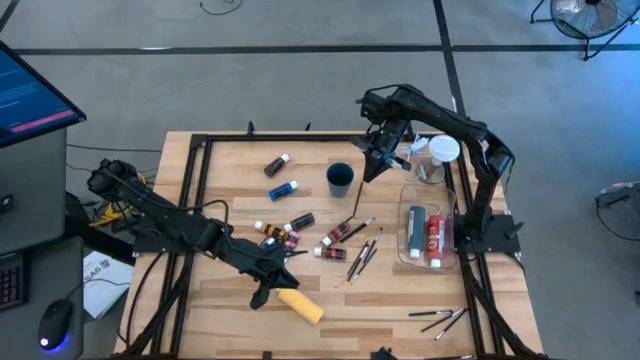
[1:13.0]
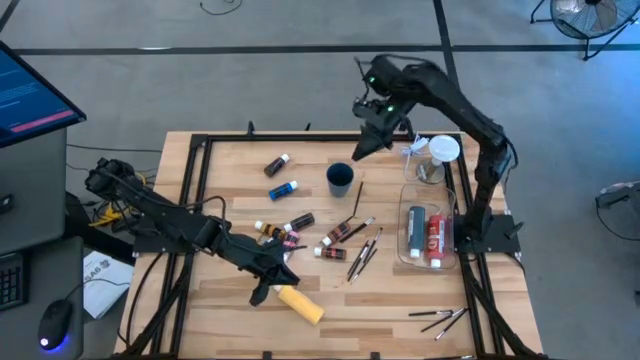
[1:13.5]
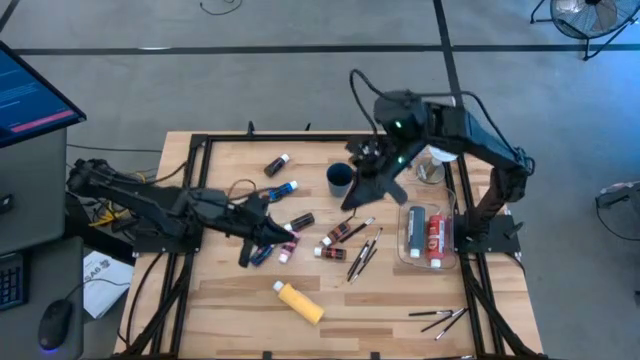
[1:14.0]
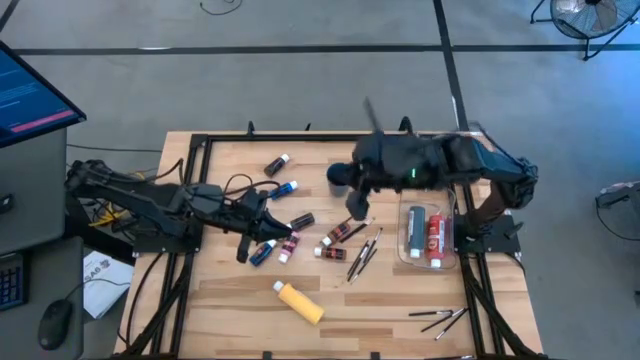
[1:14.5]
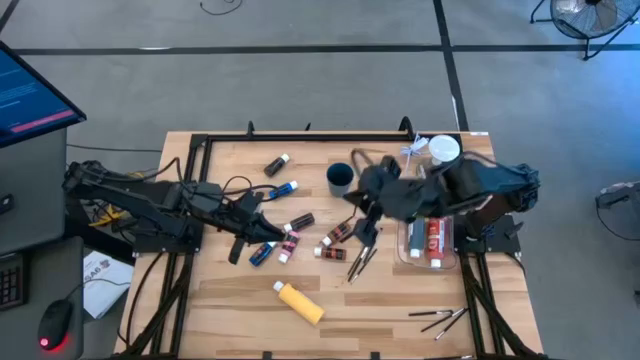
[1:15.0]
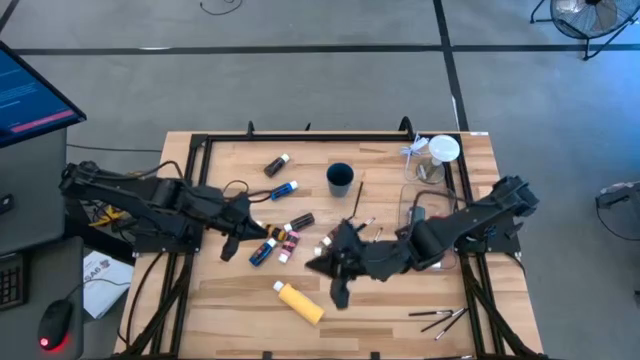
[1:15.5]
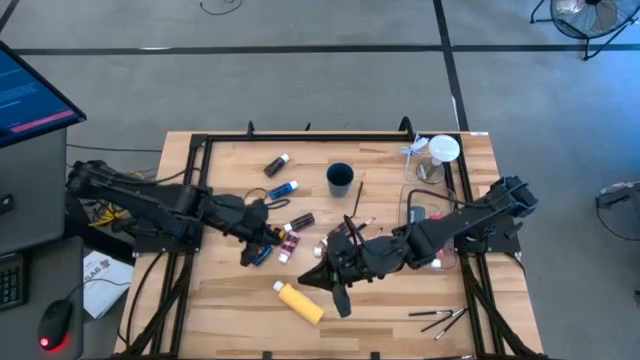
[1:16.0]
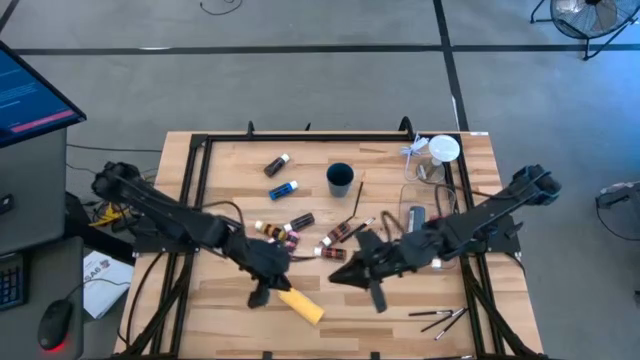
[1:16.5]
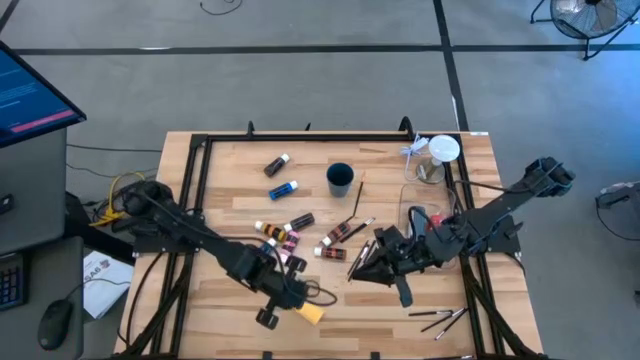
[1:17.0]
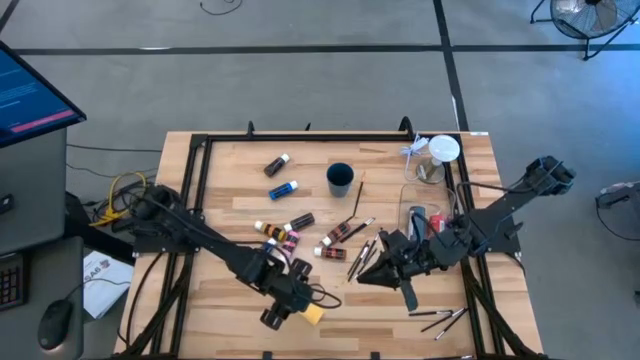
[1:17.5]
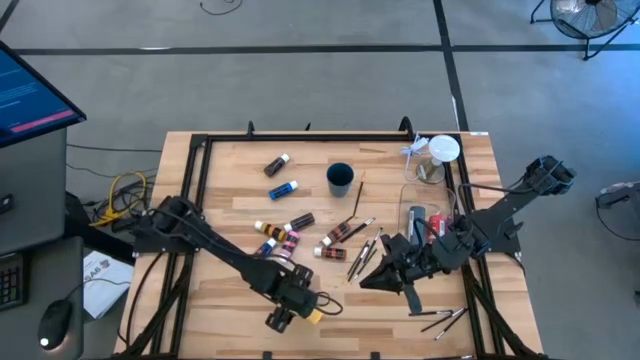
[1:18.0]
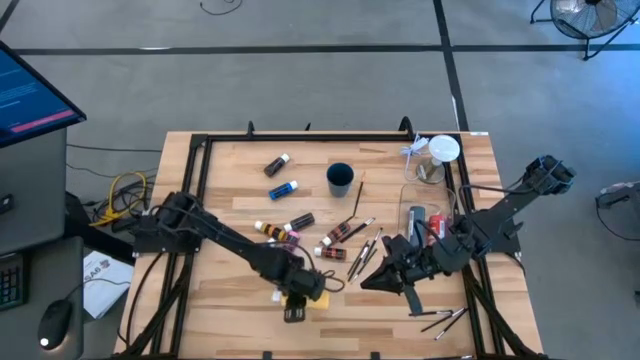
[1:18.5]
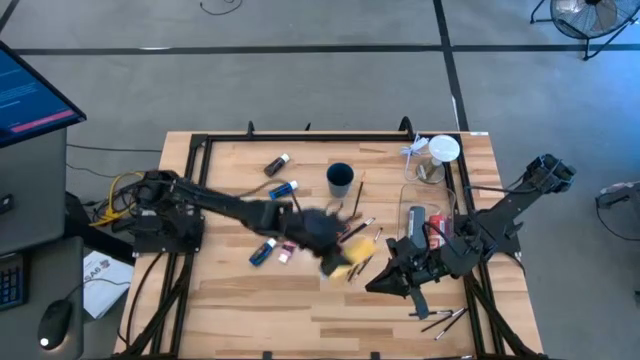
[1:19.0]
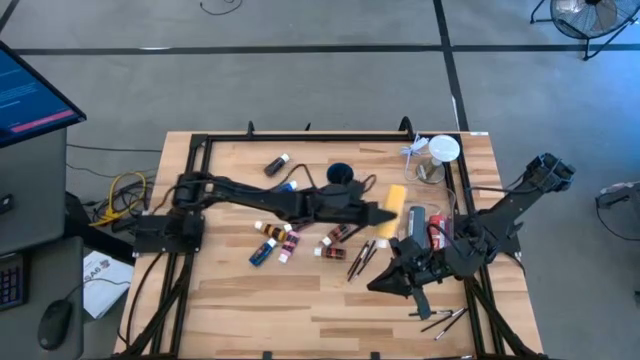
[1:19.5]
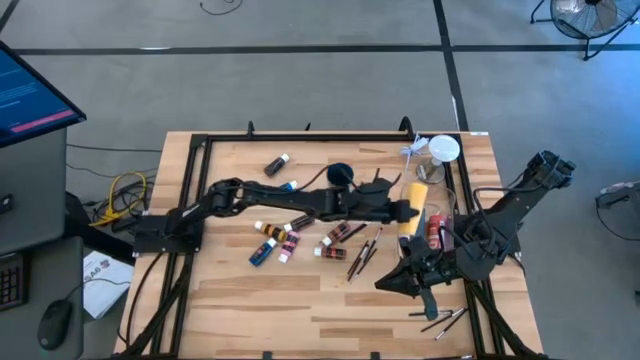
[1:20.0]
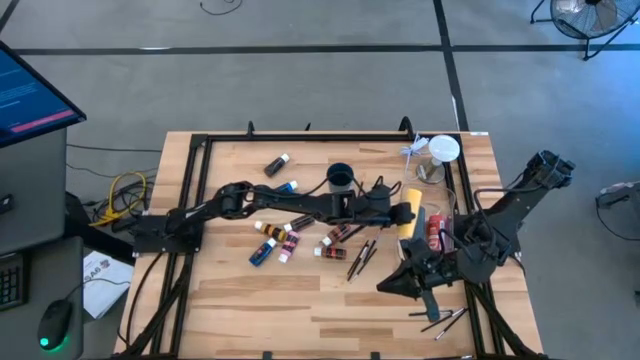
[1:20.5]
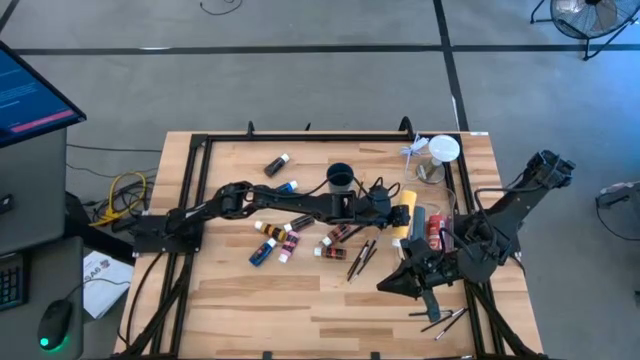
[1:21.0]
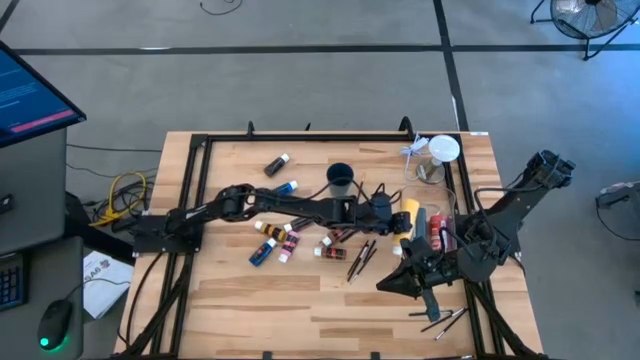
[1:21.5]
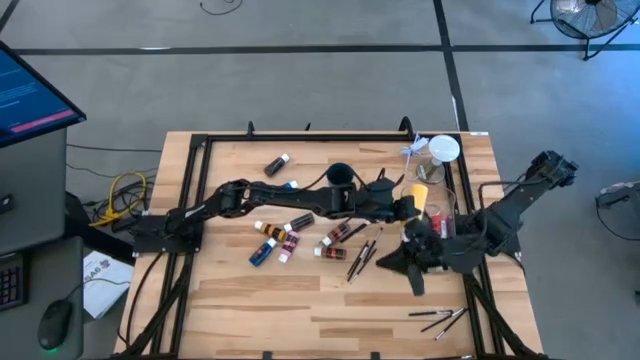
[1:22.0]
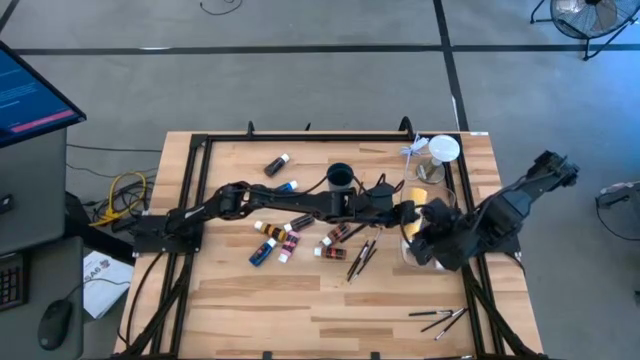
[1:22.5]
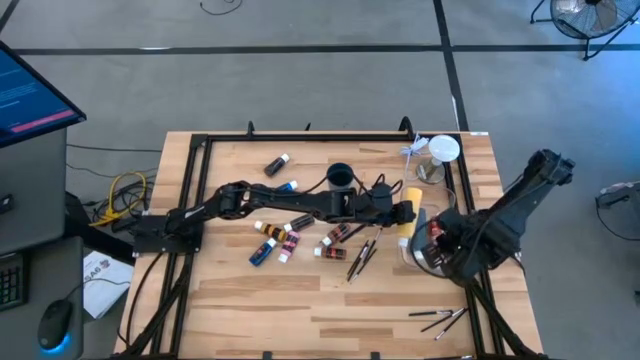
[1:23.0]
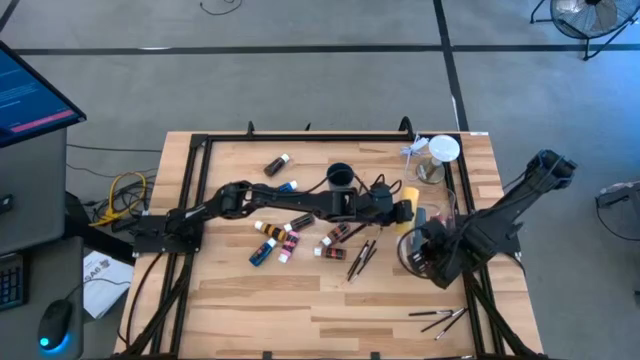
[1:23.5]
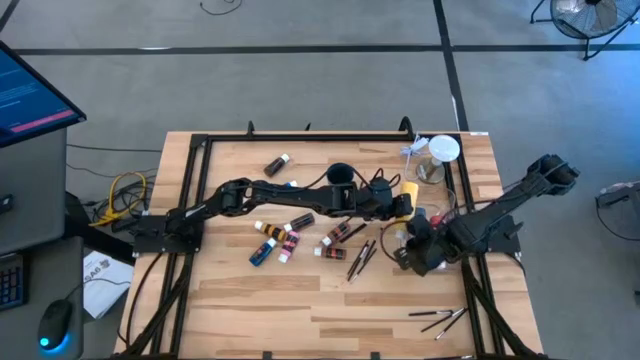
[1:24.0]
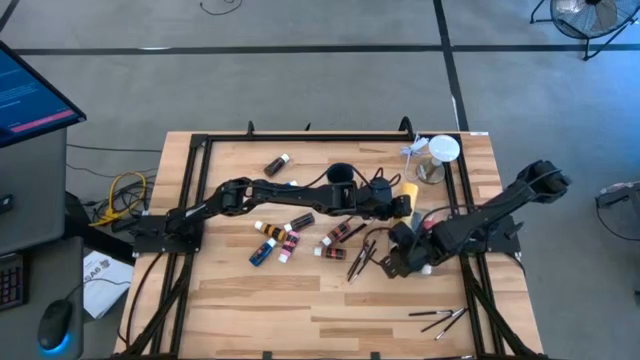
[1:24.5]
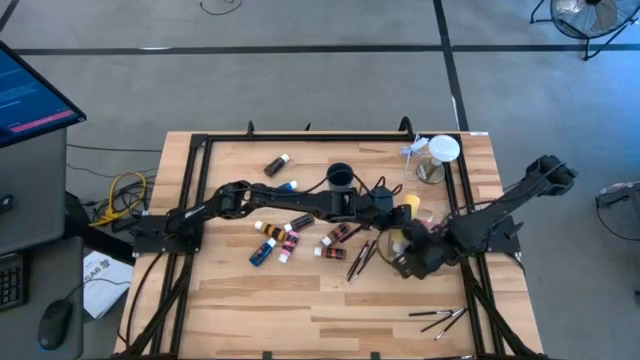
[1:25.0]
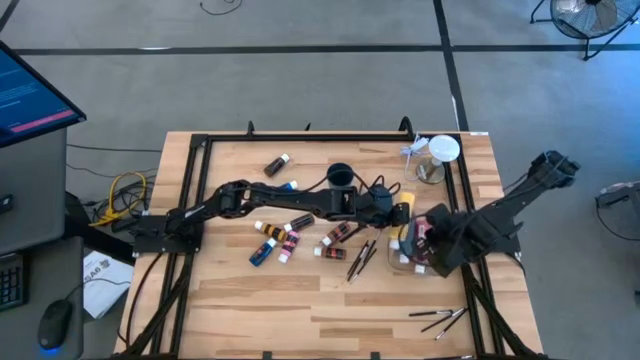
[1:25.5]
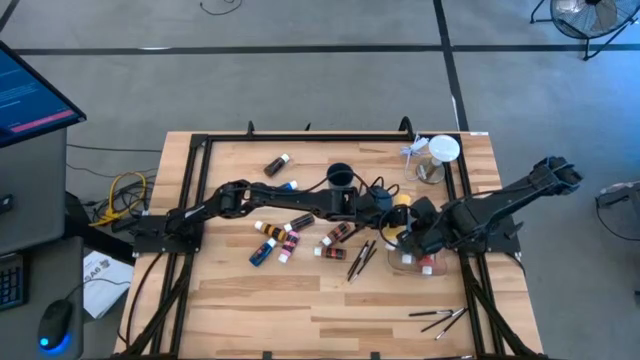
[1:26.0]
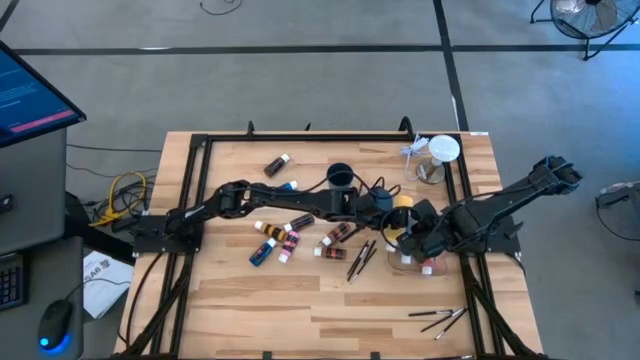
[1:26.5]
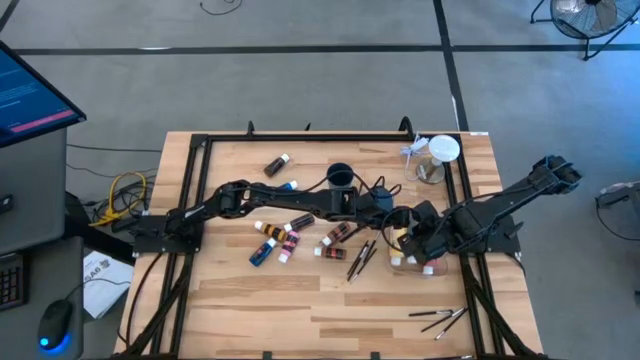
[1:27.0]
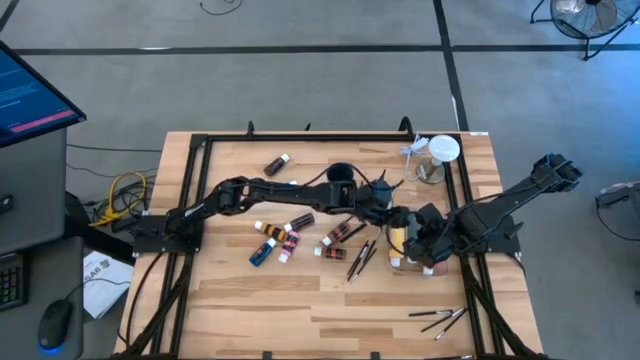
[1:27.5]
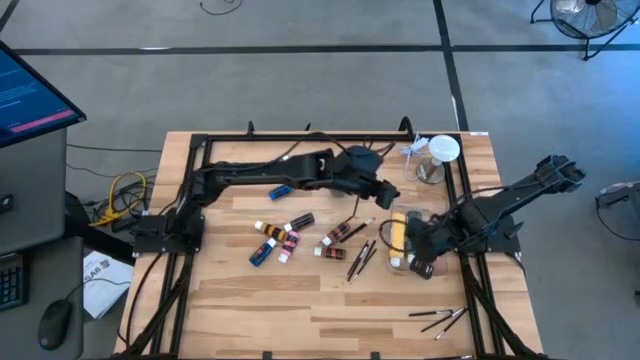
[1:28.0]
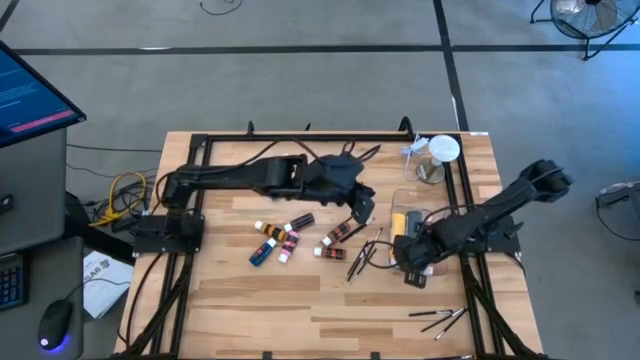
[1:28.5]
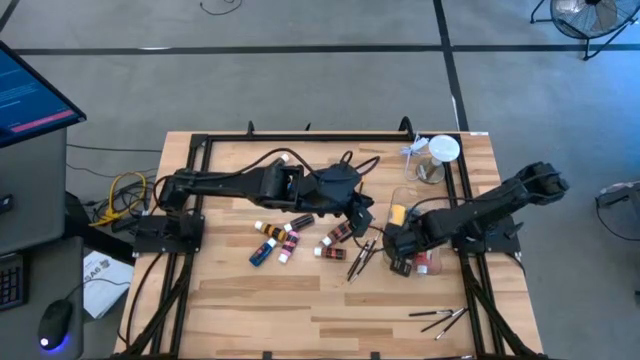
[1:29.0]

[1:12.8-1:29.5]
Task: Pick & Place Paint Supplies
Put the large yellow paint bottle into the transparent bin

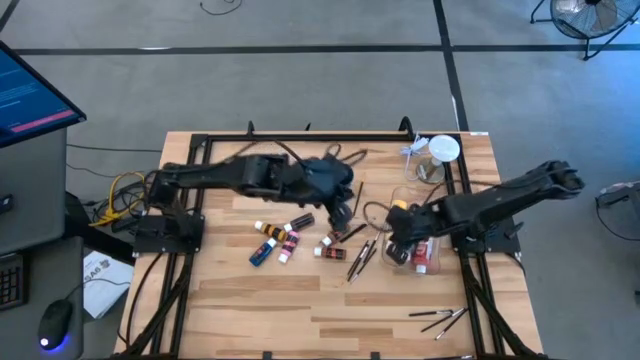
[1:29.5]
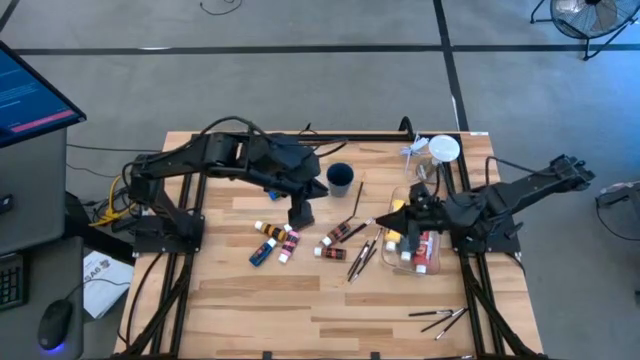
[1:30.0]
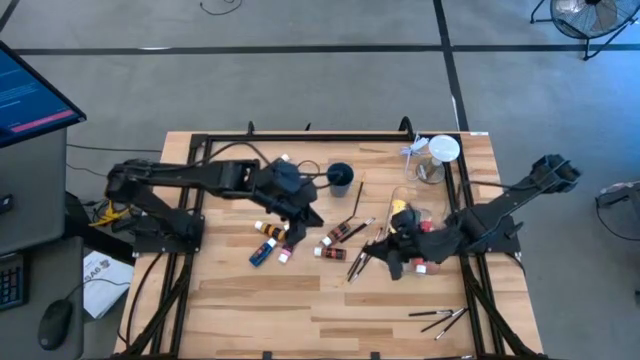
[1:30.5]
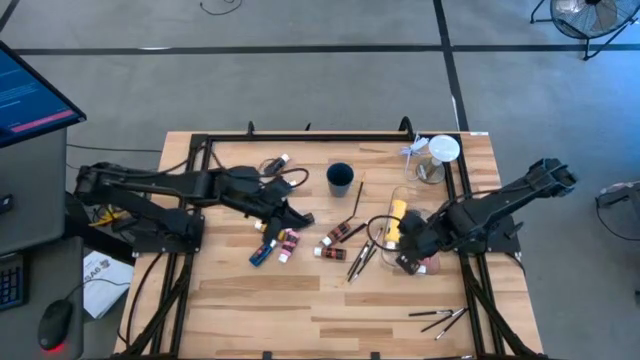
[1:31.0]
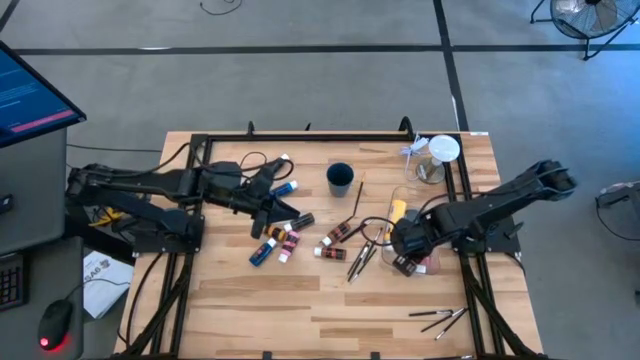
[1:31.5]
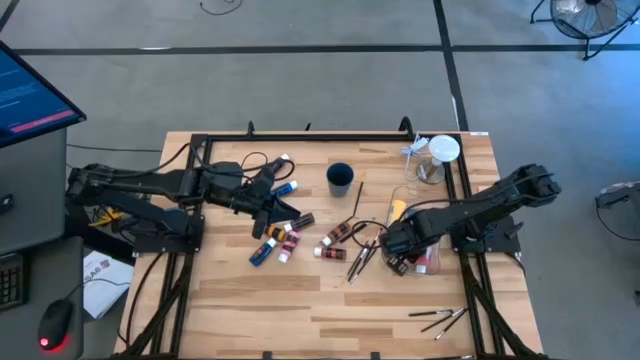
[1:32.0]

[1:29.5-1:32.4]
Adjust the black paint bottle in the transparent bin

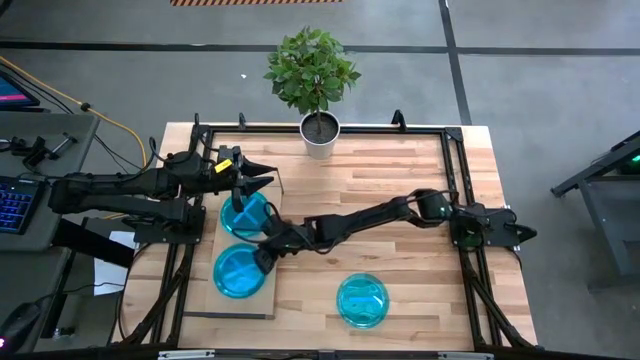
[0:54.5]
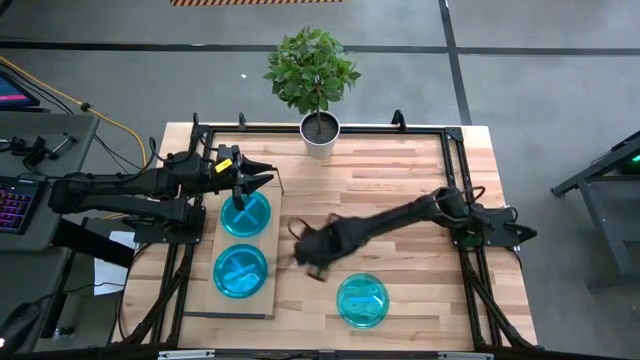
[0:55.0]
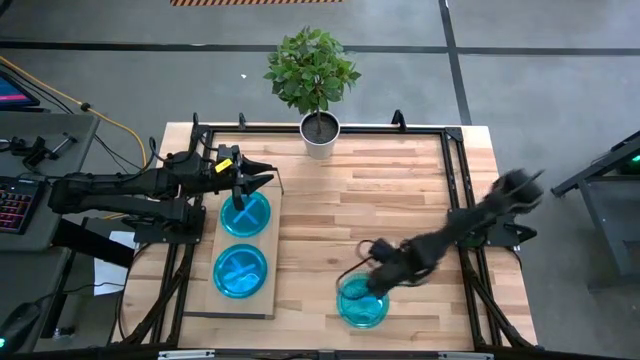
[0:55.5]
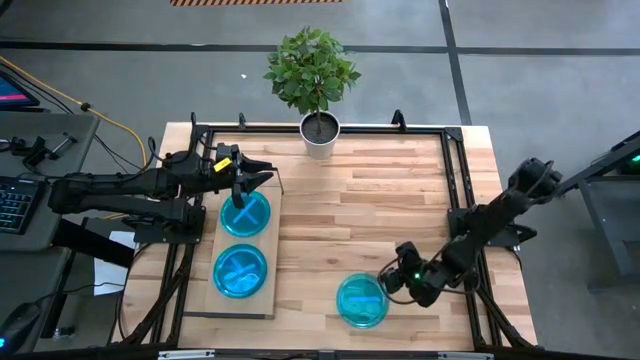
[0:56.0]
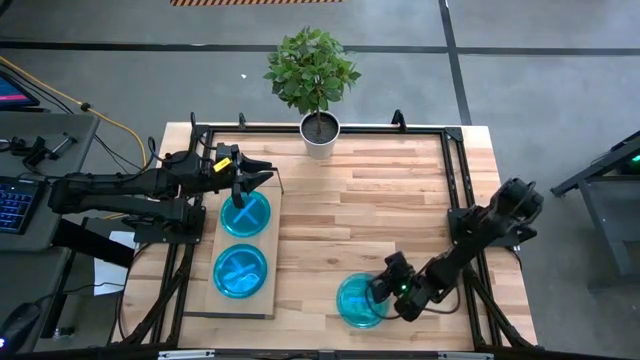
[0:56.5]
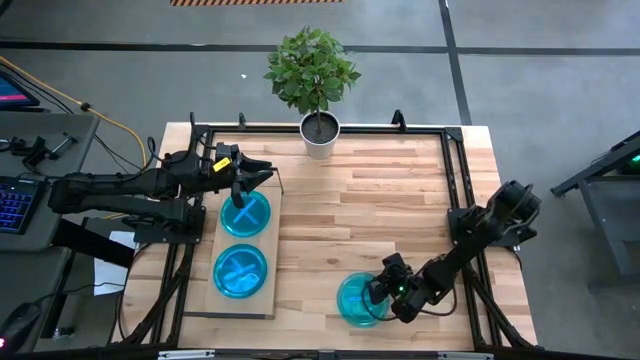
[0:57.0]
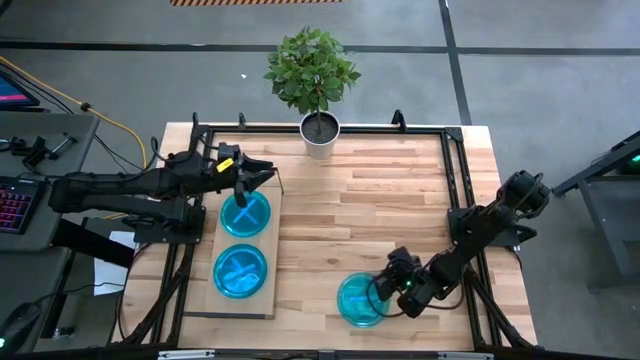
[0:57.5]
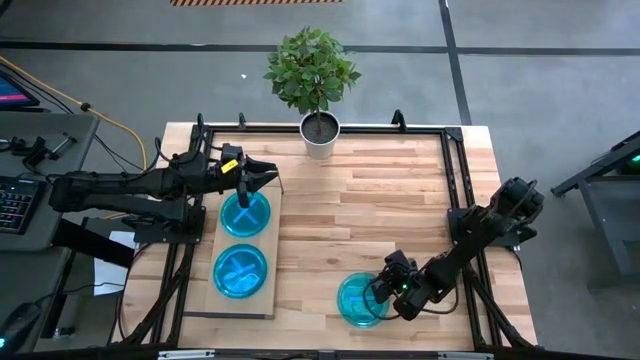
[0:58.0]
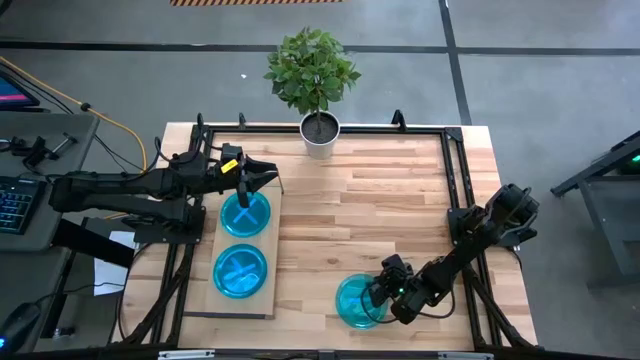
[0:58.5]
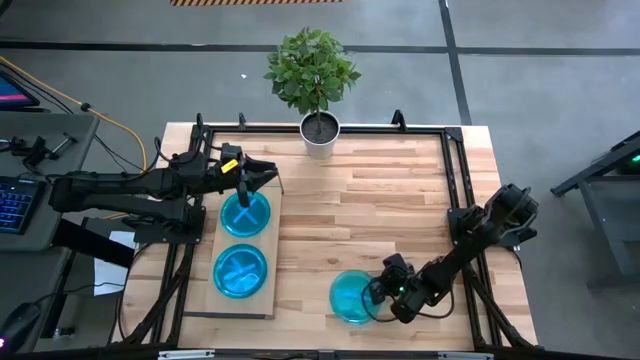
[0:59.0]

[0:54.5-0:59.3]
Task: Place and stack plates onto a shelf
Stack the blue plate on the top blue plate on the shelf
